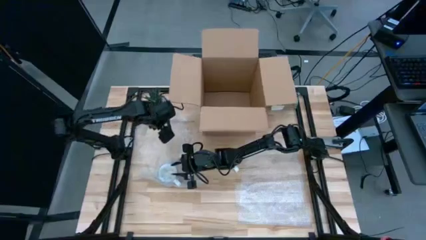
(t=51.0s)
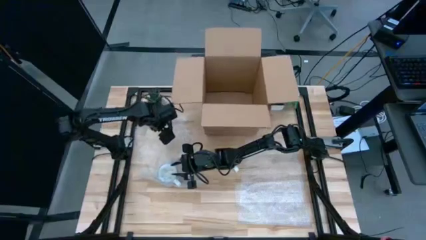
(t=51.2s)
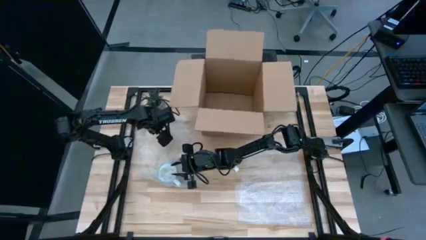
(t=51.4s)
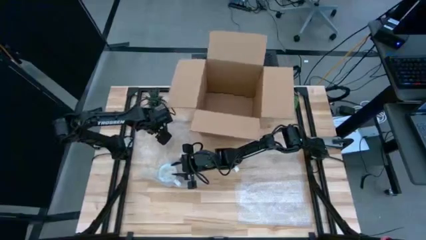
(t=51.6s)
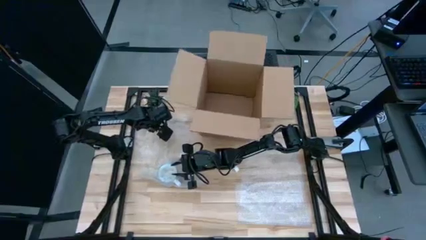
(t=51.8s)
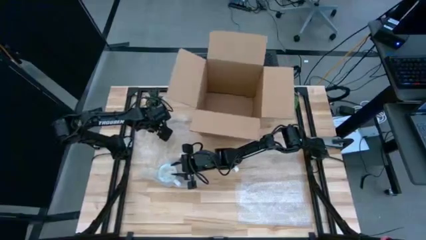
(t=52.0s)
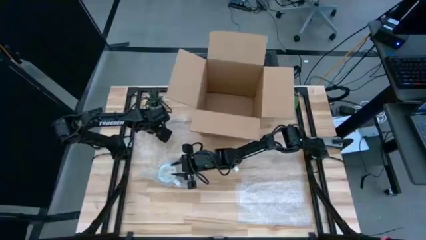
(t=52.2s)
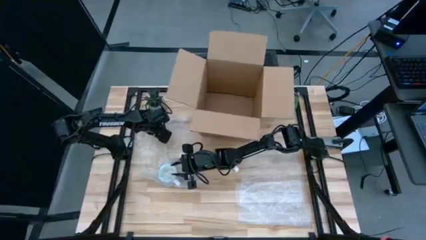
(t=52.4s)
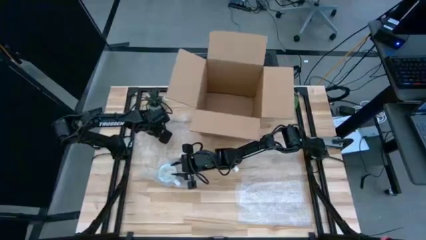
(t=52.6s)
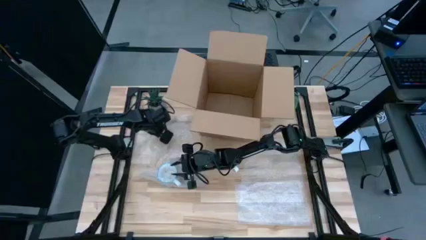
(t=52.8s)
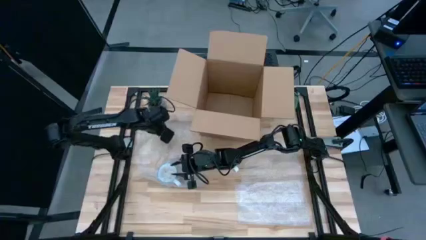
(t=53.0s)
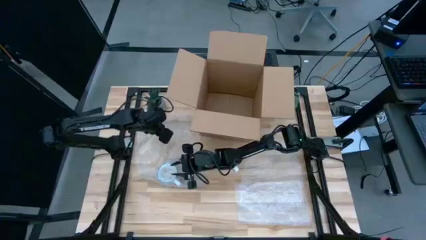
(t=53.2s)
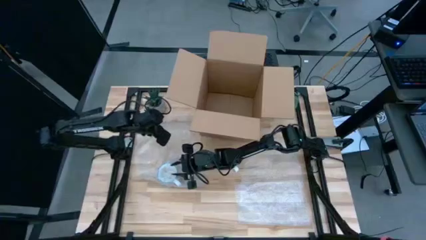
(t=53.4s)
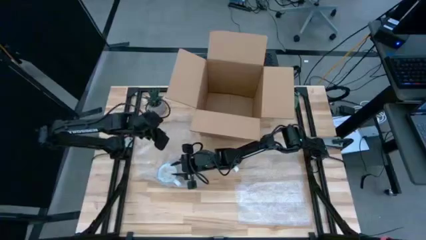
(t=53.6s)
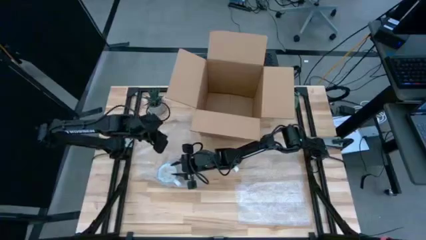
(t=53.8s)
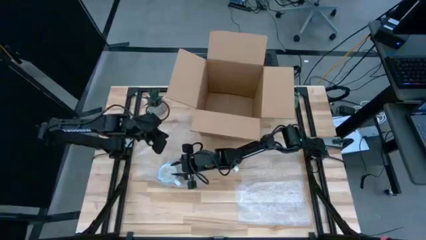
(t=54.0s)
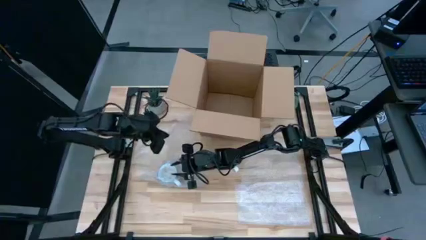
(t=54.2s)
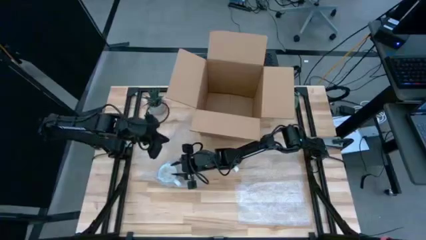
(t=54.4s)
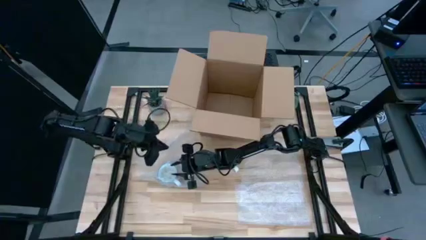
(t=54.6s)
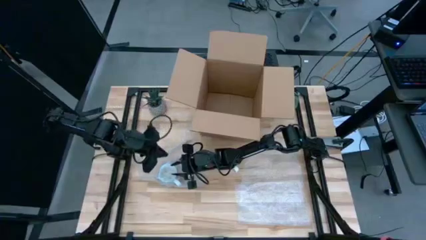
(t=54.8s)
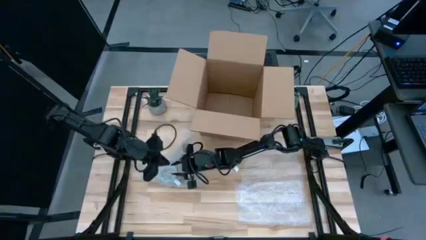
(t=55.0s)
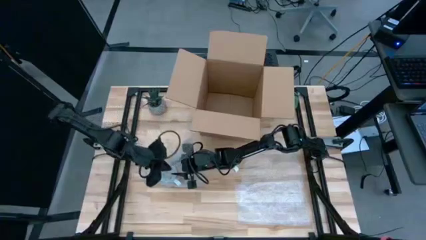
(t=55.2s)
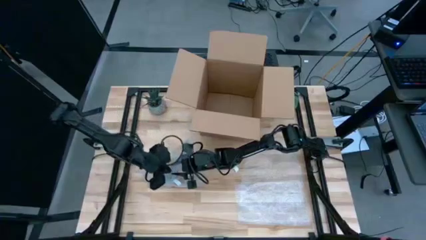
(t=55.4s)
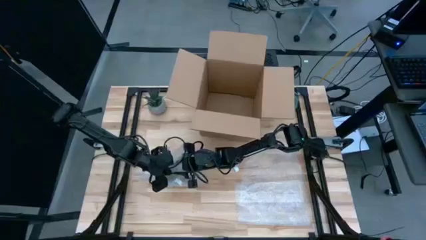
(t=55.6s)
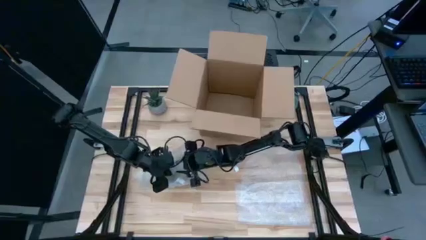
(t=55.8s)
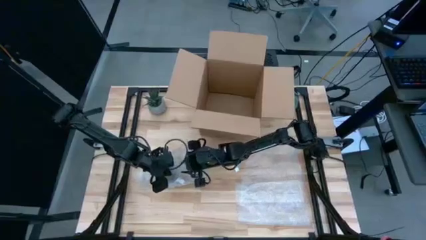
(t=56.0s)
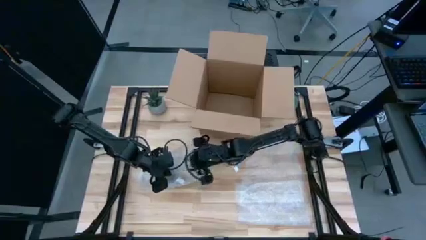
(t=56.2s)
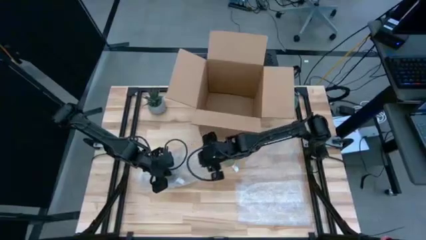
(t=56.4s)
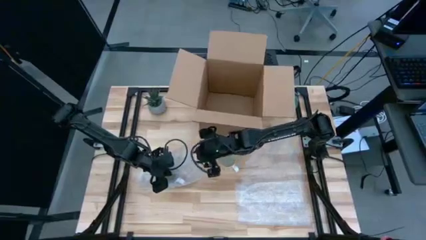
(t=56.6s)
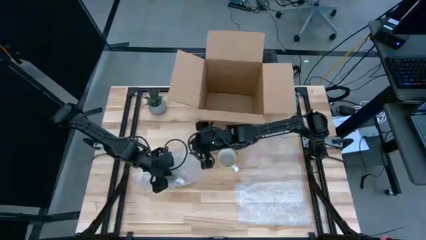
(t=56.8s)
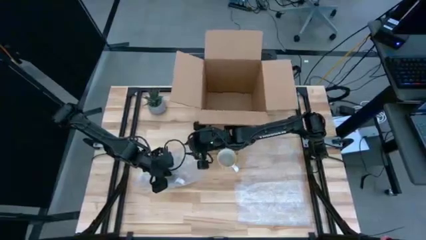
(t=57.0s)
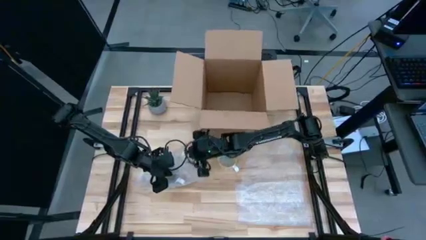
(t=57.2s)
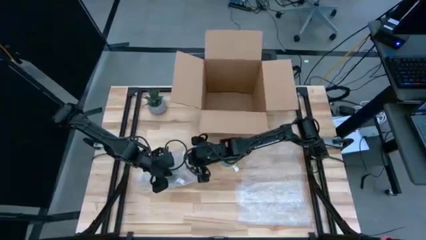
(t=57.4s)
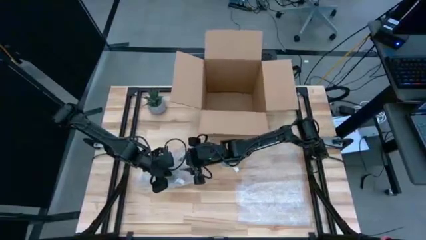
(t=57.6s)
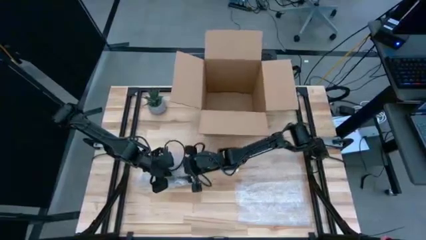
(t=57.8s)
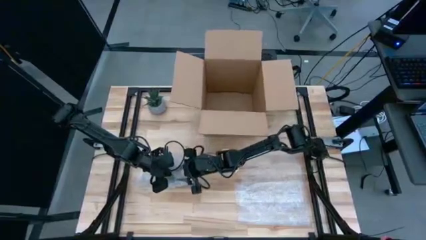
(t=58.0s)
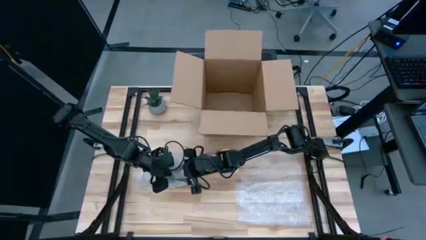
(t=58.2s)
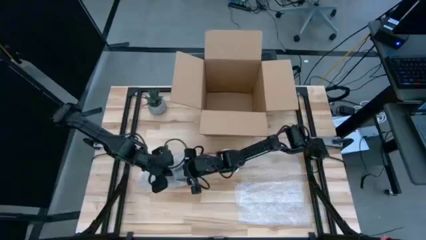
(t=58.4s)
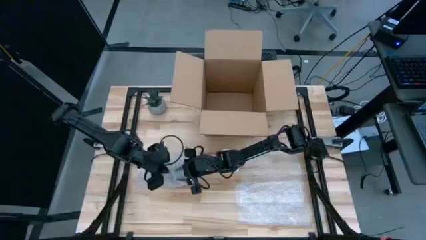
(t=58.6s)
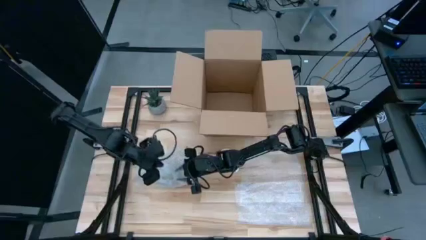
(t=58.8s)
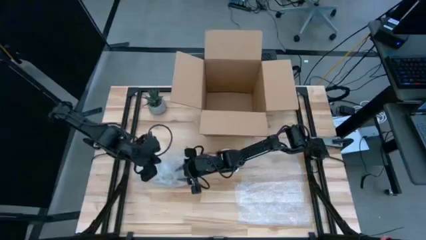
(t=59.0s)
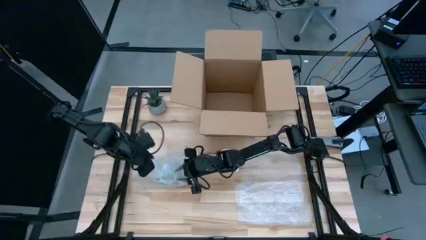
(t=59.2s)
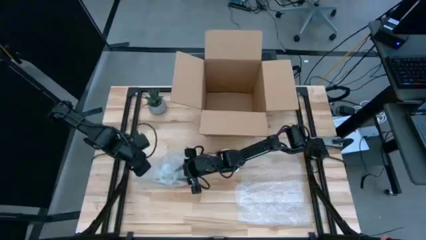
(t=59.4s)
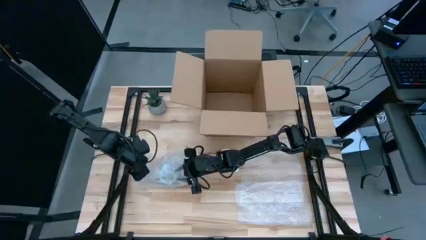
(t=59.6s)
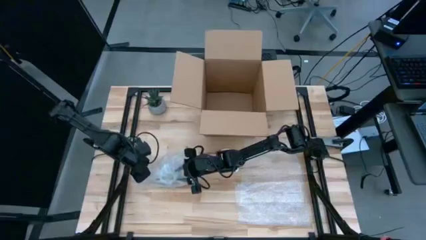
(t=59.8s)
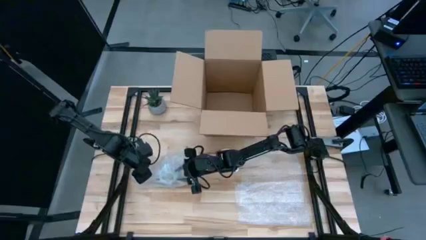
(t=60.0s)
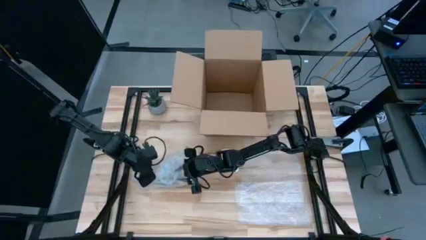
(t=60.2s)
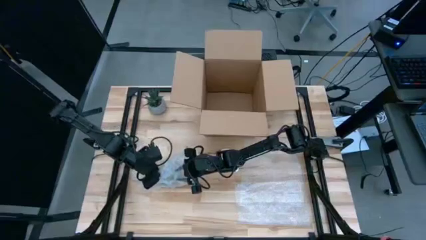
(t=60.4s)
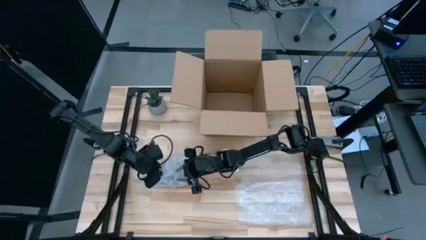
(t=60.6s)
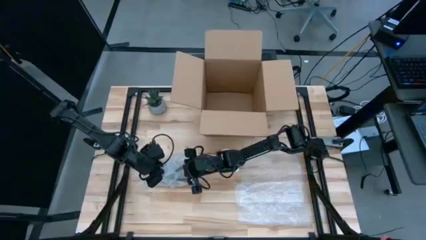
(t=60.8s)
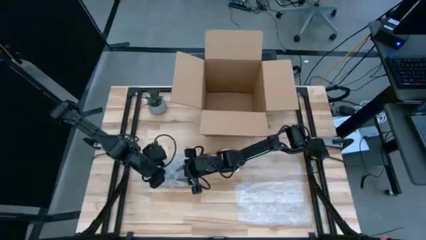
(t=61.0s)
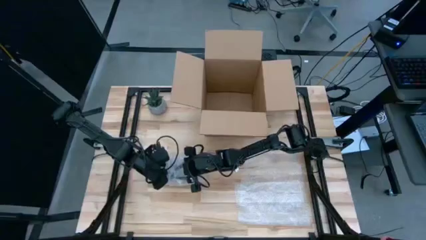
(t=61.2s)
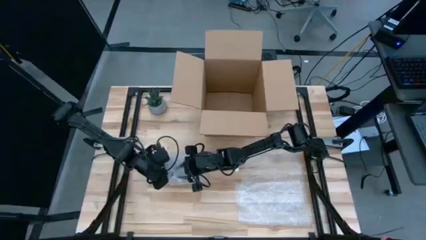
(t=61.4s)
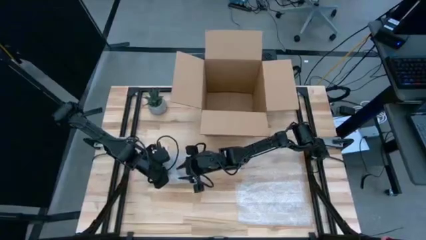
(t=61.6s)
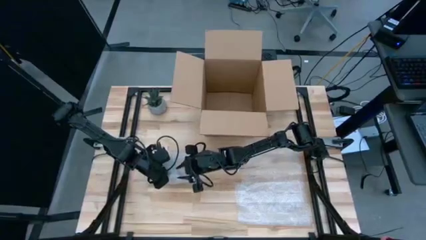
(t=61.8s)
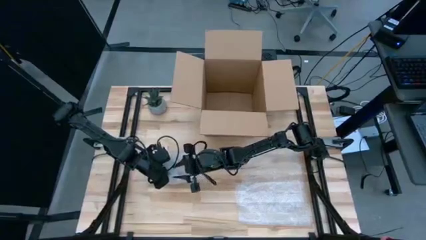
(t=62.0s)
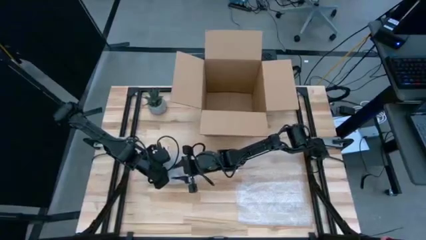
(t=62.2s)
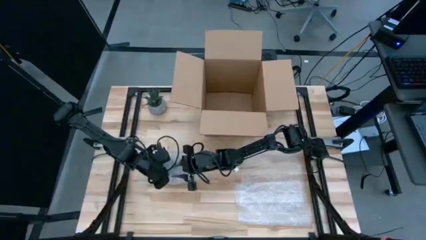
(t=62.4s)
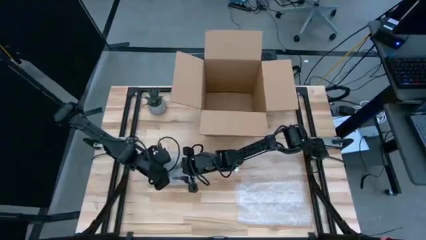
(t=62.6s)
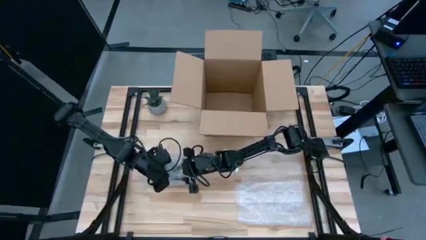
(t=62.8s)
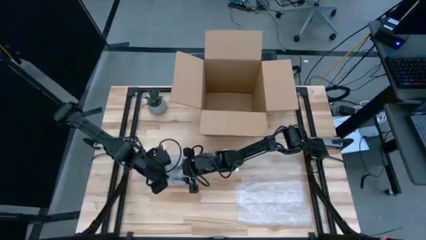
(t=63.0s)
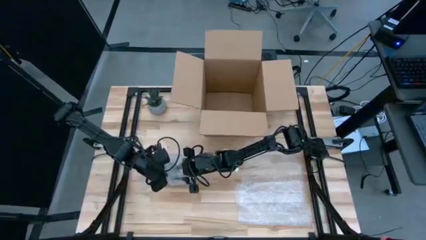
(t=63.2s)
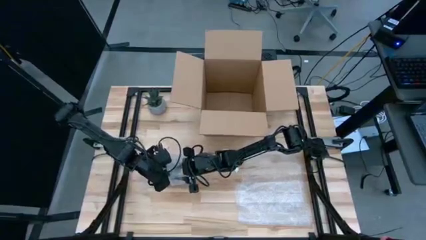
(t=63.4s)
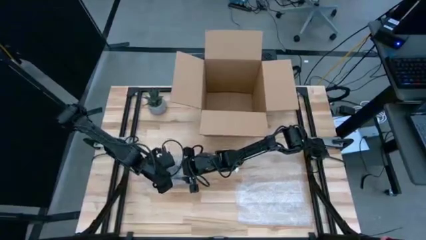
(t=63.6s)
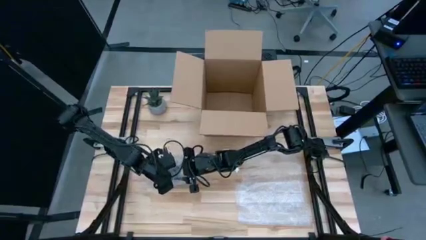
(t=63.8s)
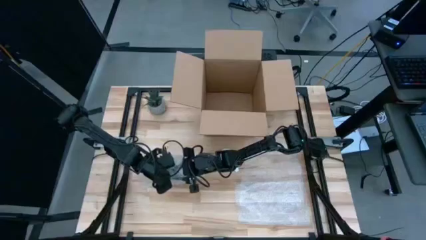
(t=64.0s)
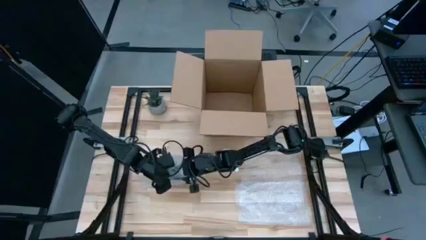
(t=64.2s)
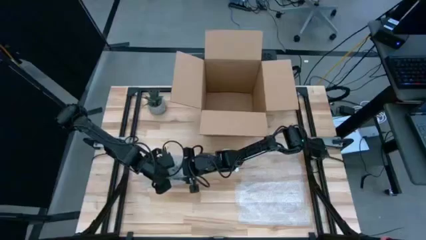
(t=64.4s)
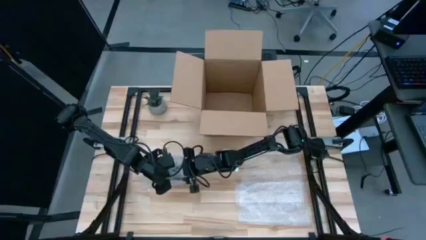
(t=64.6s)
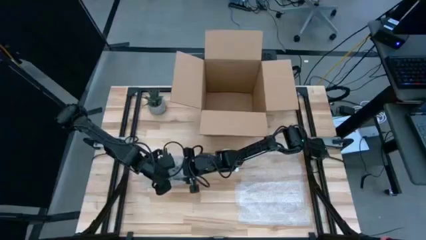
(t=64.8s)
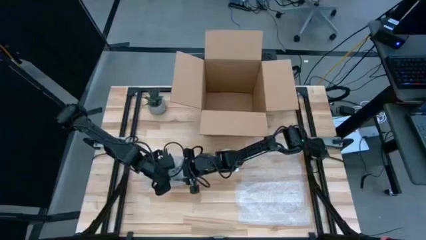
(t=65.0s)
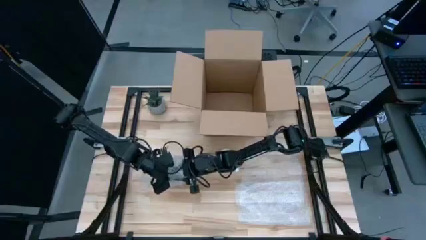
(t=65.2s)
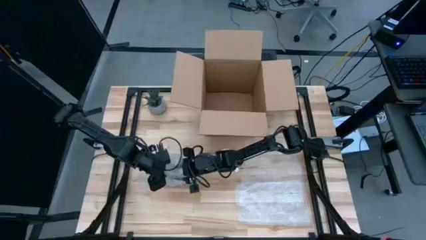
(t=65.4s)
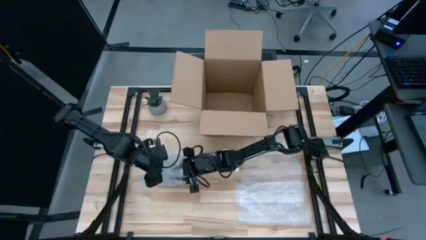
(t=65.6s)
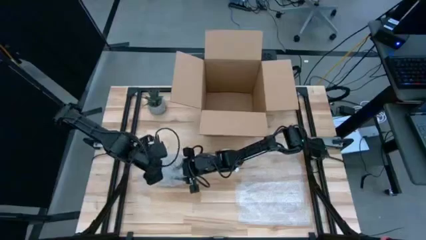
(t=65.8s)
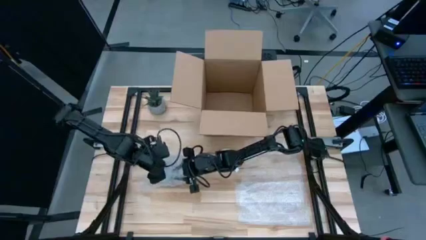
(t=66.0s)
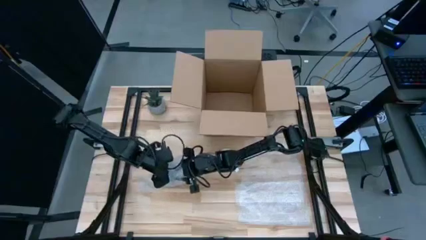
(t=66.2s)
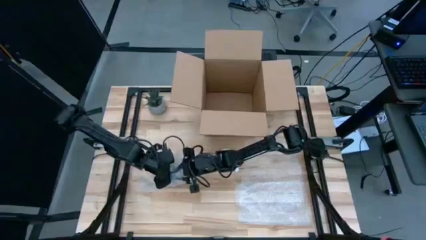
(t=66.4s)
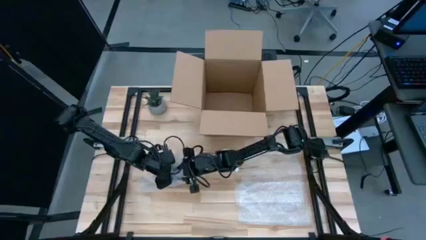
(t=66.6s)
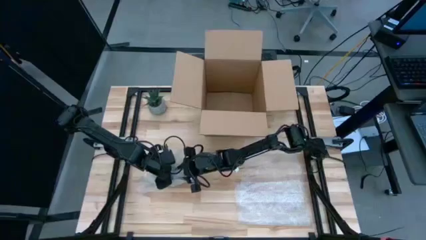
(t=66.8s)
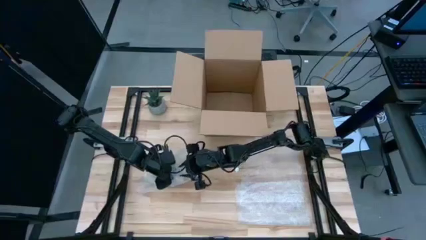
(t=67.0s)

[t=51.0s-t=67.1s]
Task: wrap mug
Wrap the red mug with the bubble wrap
